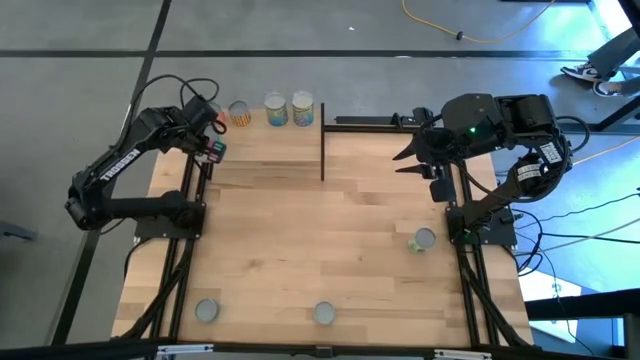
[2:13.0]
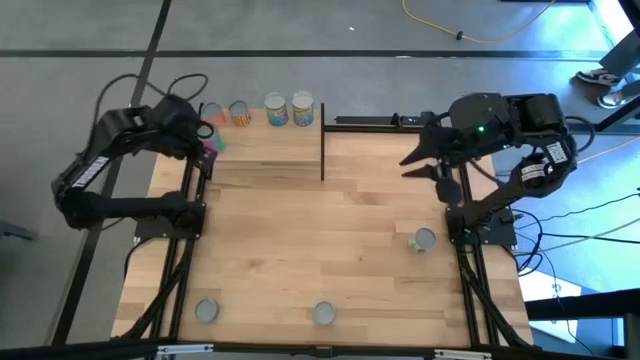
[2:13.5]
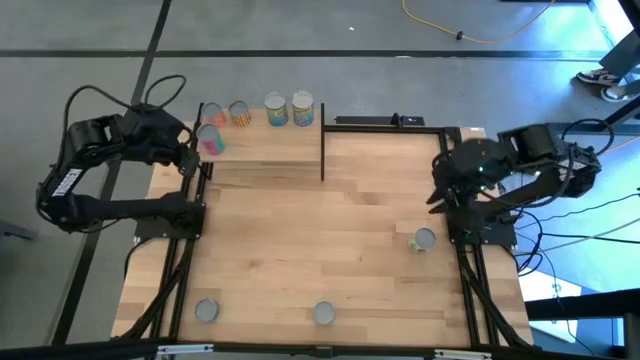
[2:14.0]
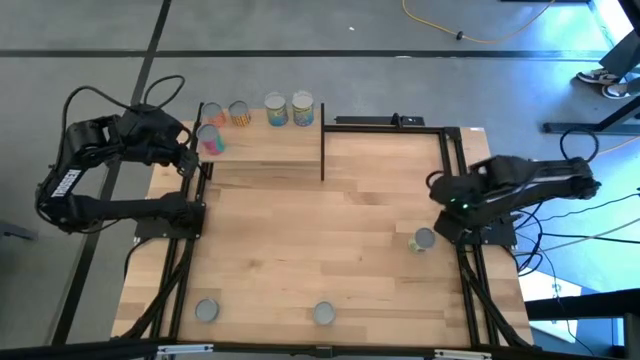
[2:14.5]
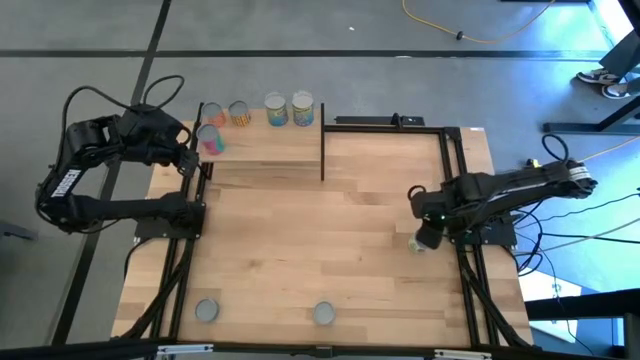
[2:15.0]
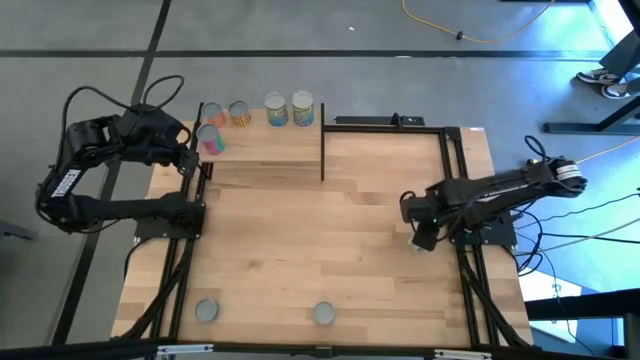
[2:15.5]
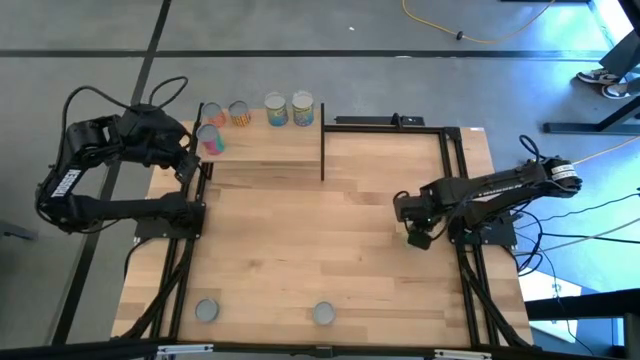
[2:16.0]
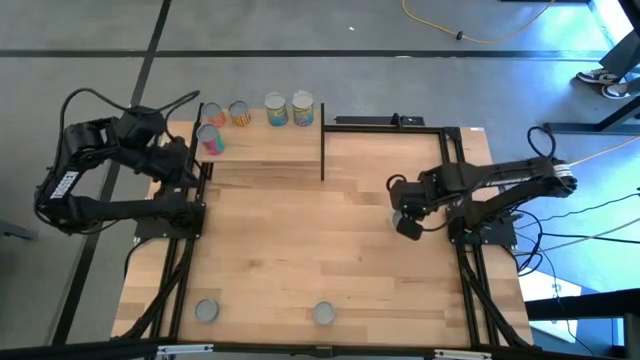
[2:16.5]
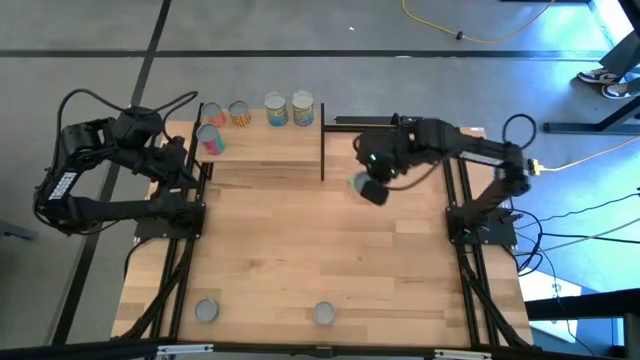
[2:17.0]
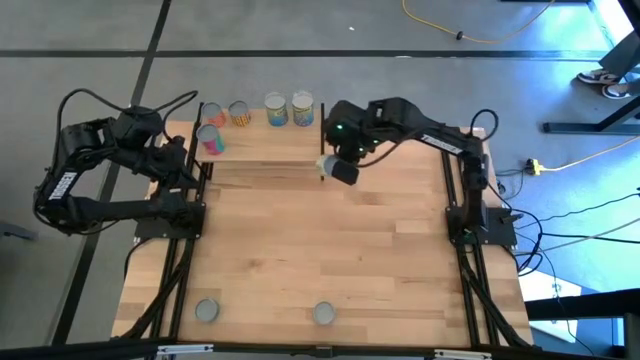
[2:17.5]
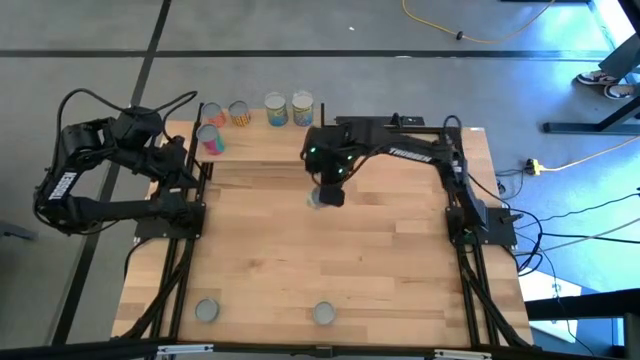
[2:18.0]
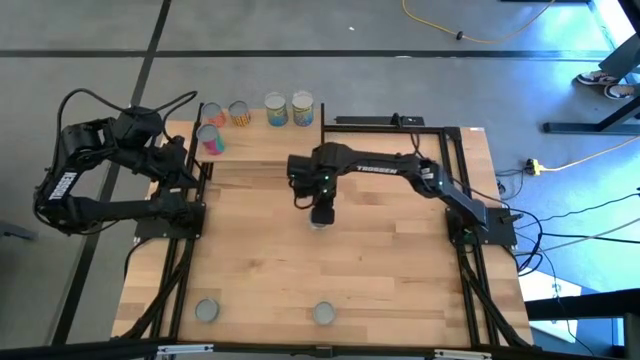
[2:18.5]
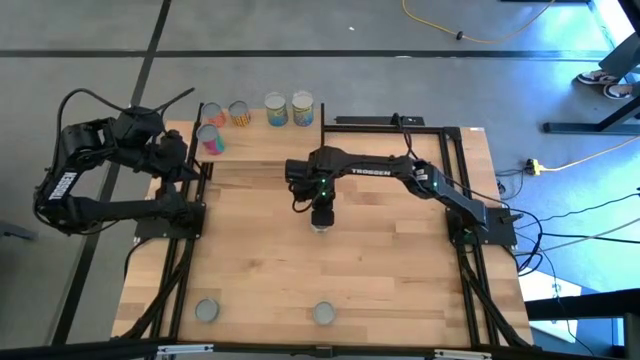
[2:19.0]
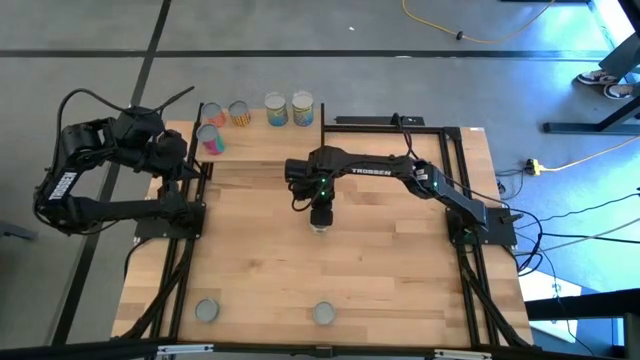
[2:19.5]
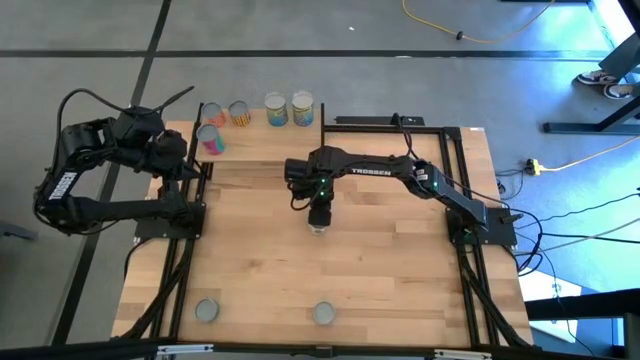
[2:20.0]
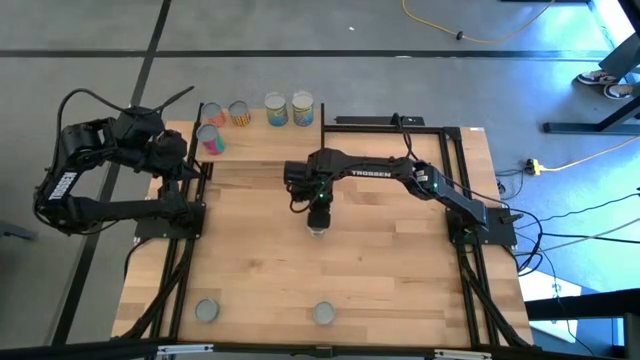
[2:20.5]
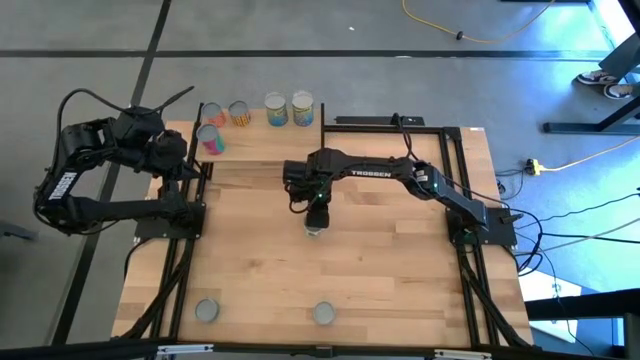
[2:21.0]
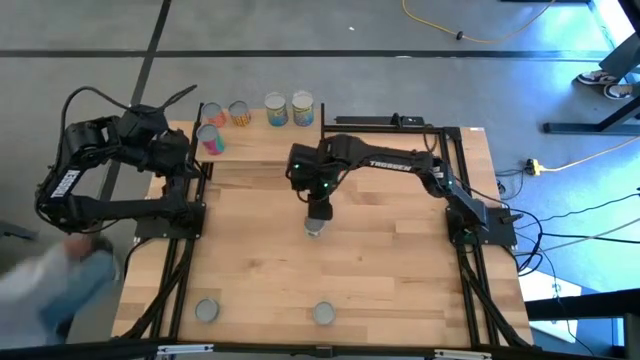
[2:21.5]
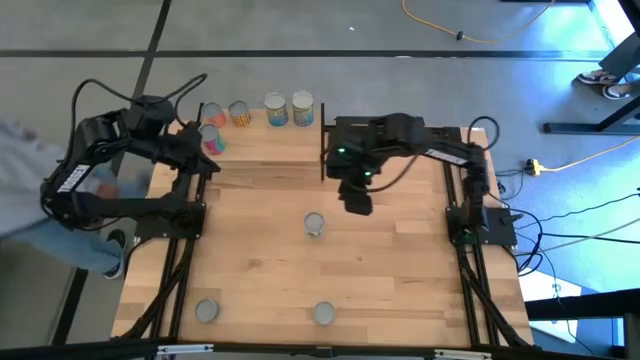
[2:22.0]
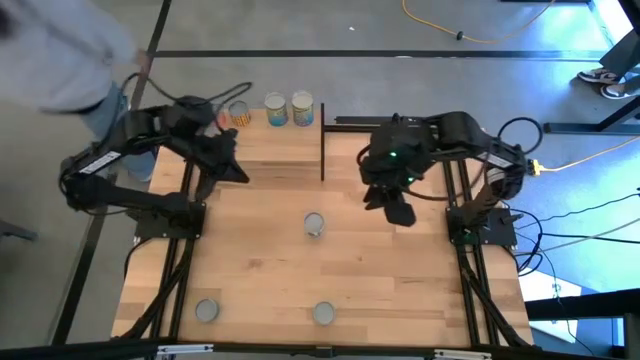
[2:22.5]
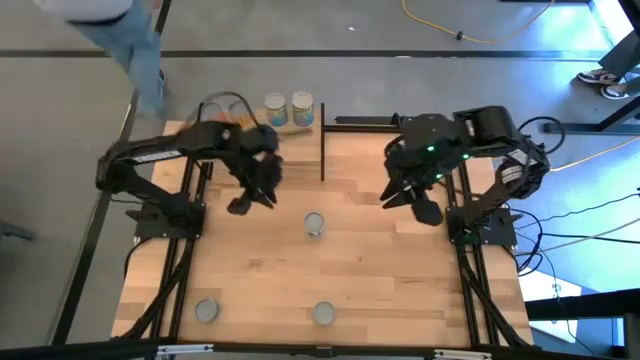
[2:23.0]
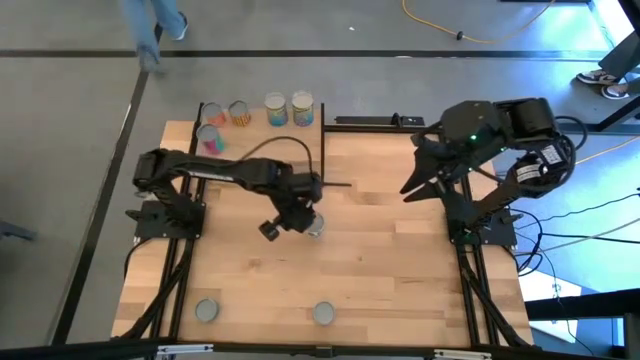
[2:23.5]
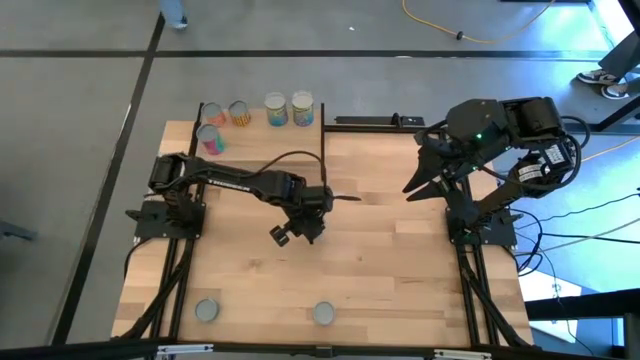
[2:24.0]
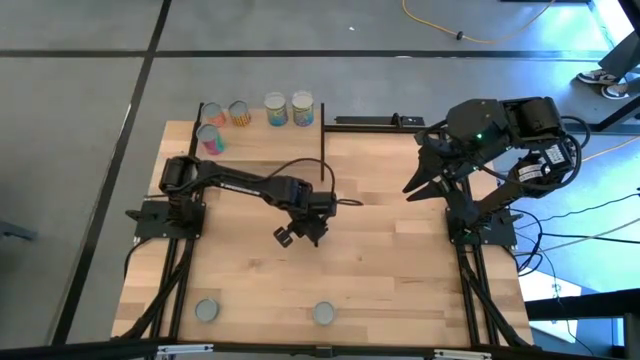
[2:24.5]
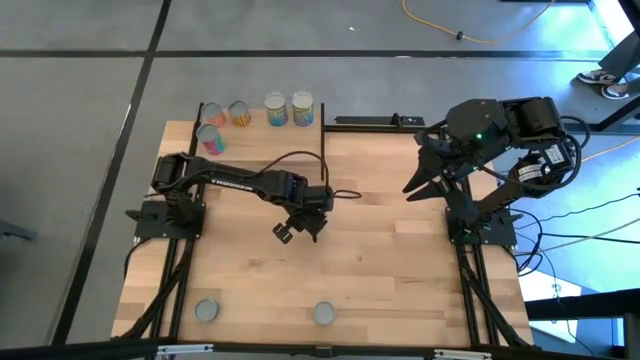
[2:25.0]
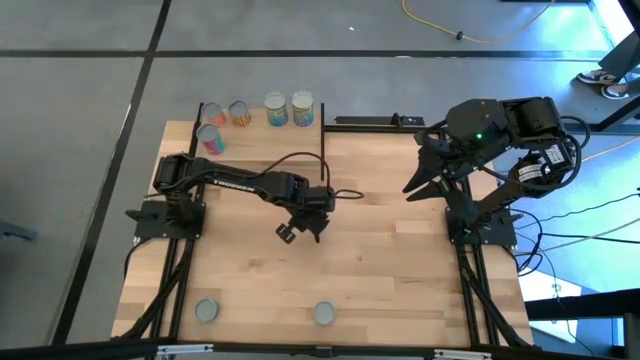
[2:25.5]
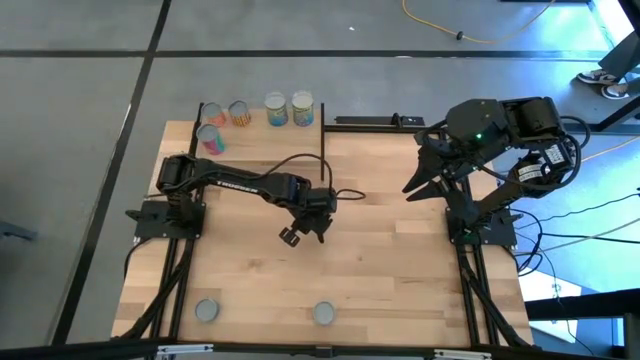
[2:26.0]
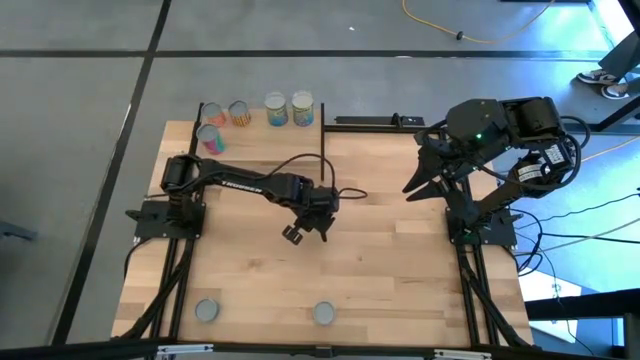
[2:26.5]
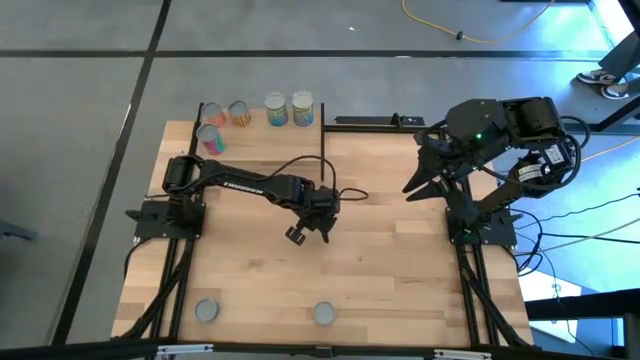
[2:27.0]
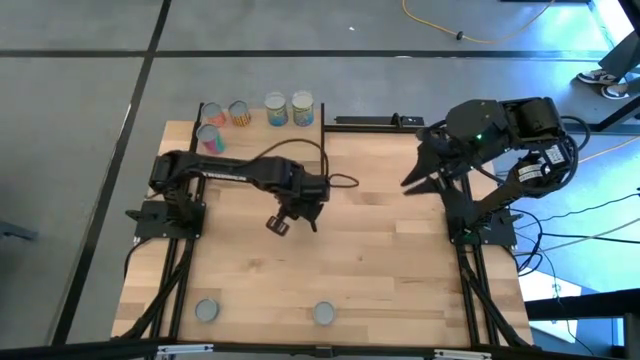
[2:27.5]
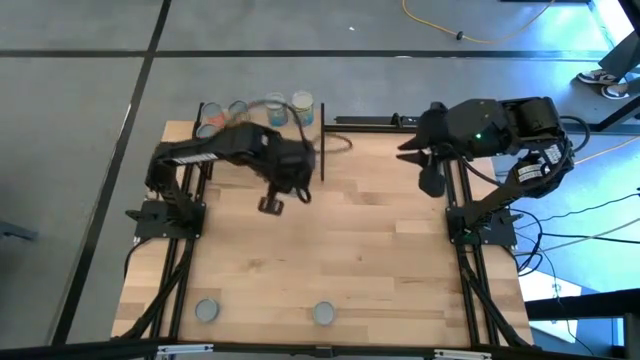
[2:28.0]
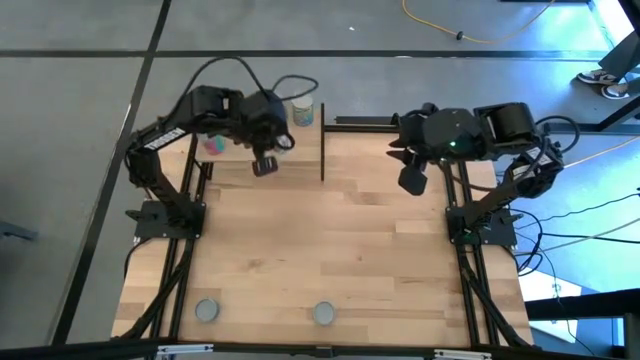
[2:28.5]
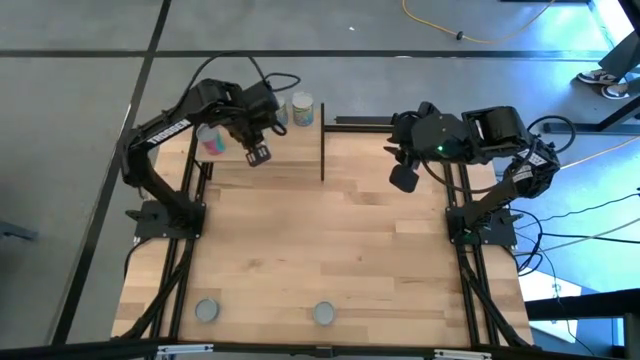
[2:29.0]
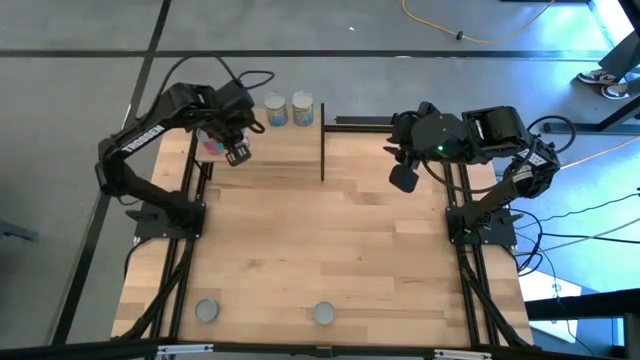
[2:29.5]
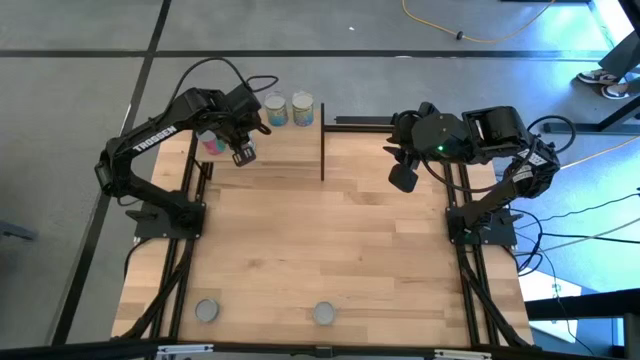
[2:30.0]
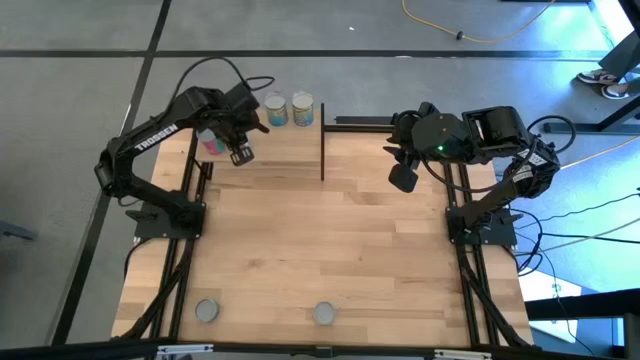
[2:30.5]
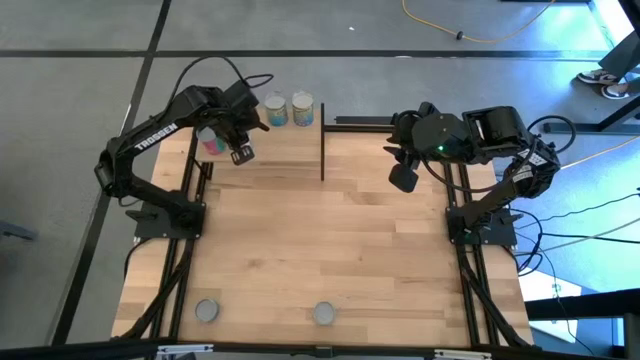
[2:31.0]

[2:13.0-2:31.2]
Task: Pick and place cans onto a shelf
Put the canned mixed vegetables on the shelf

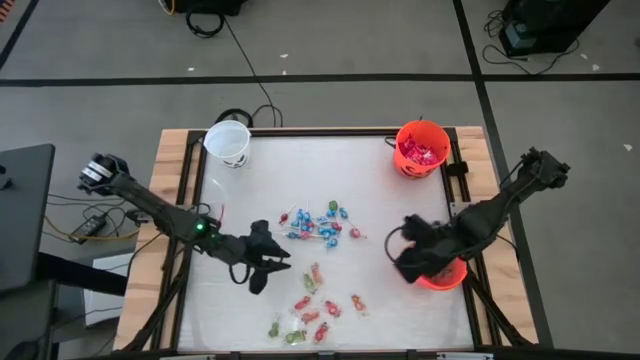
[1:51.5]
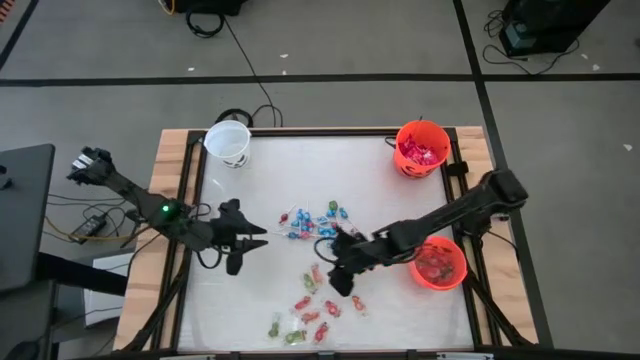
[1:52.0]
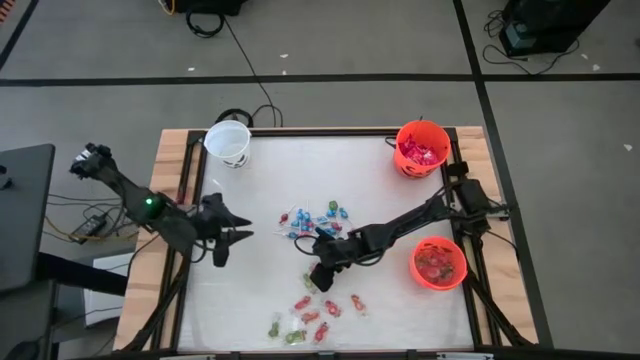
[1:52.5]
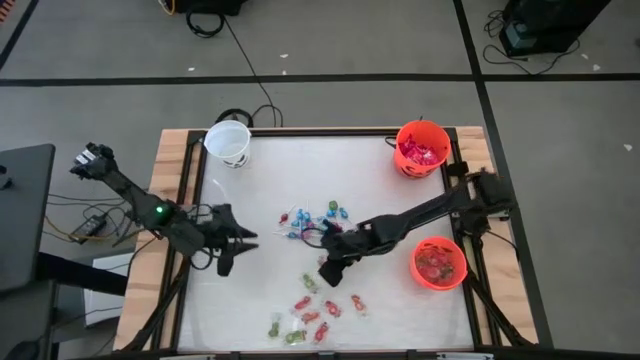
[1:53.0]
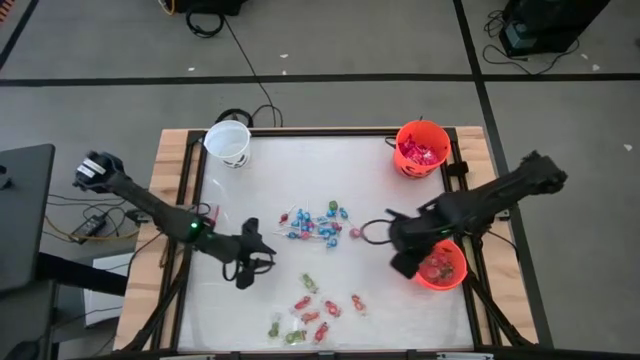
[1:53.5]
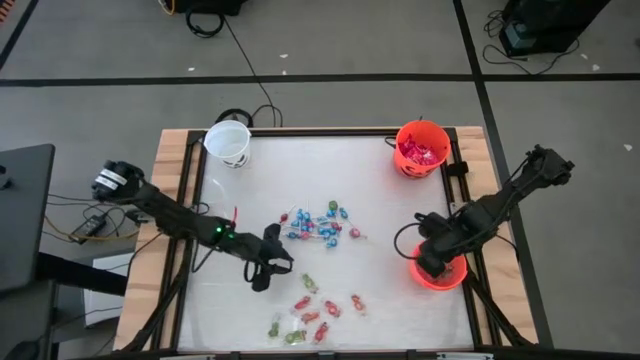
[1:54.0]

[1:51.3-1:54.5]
Task: Sort candy by brand, put in halloween buckets
Put the orange gummy into the bottom orange bucket
